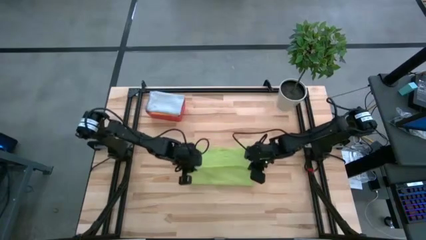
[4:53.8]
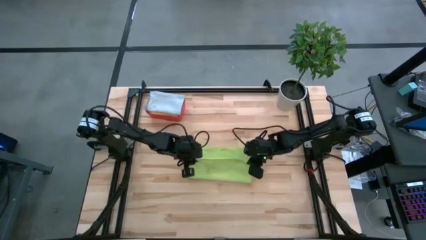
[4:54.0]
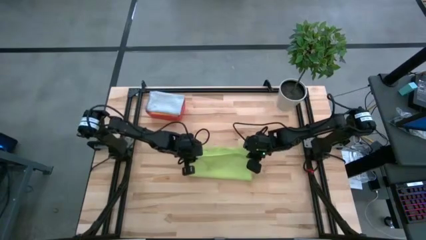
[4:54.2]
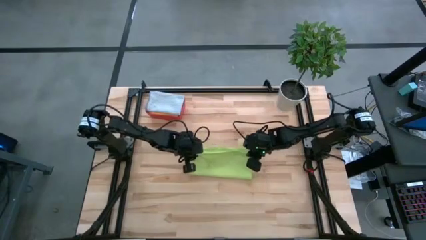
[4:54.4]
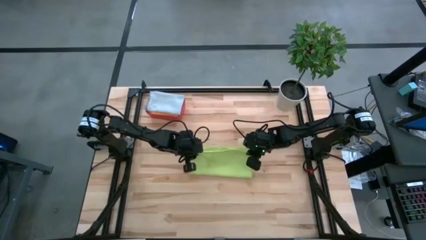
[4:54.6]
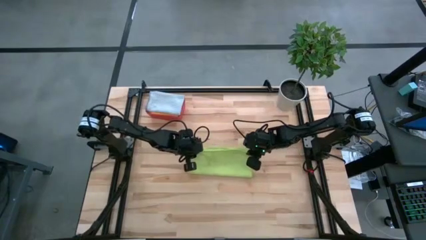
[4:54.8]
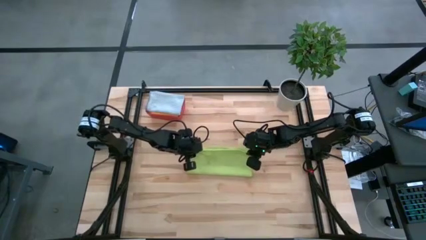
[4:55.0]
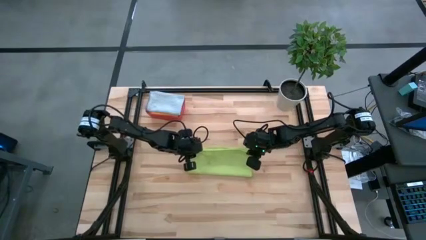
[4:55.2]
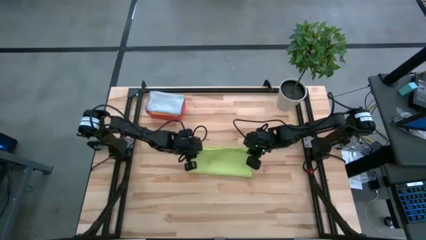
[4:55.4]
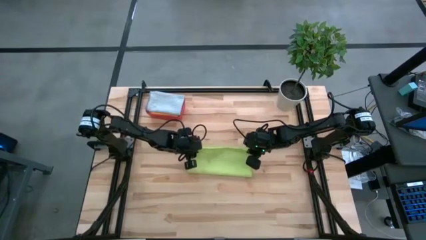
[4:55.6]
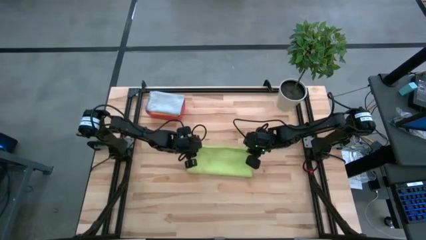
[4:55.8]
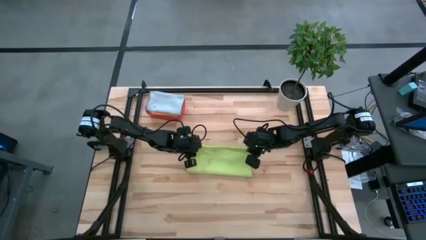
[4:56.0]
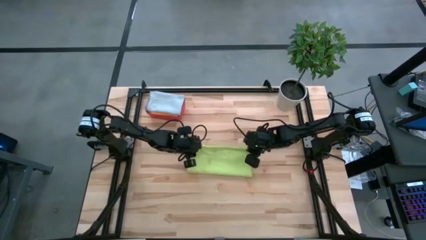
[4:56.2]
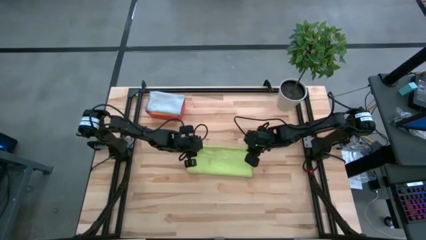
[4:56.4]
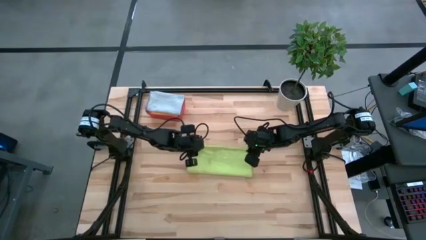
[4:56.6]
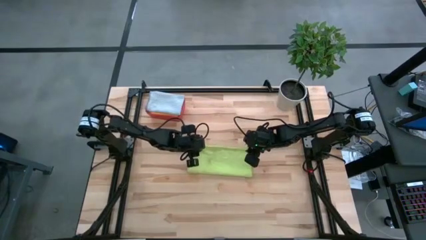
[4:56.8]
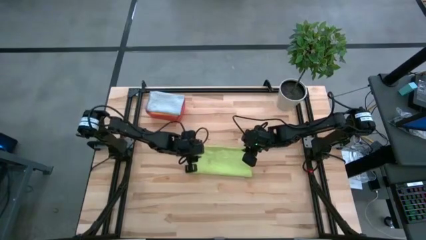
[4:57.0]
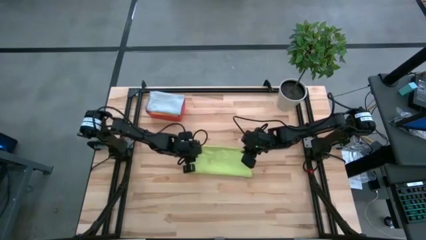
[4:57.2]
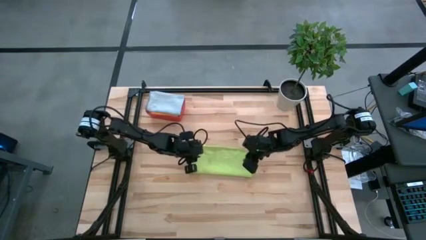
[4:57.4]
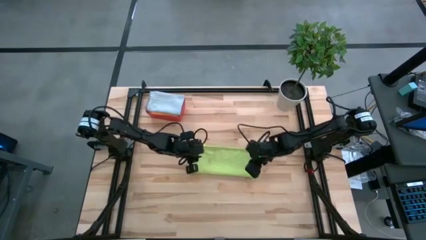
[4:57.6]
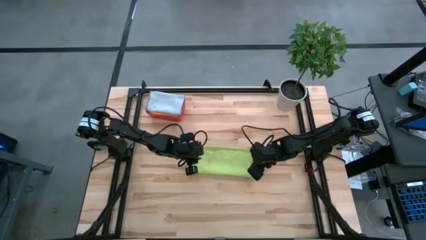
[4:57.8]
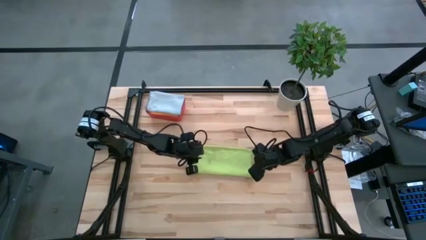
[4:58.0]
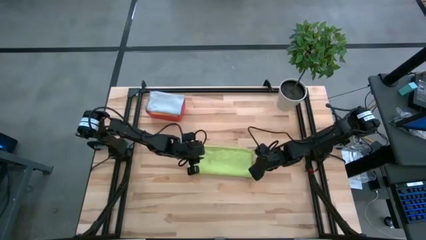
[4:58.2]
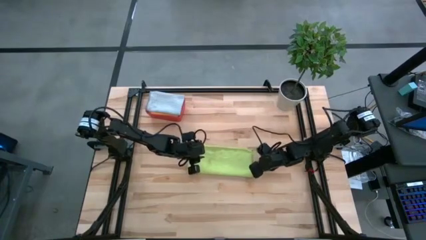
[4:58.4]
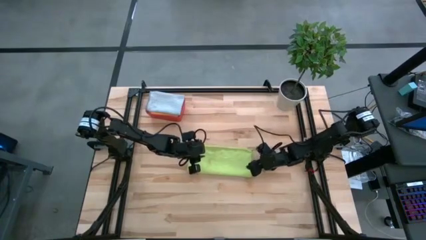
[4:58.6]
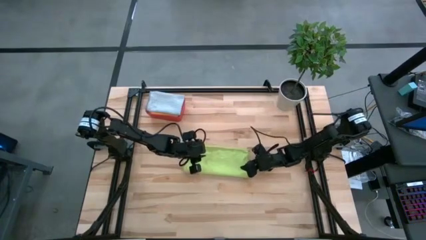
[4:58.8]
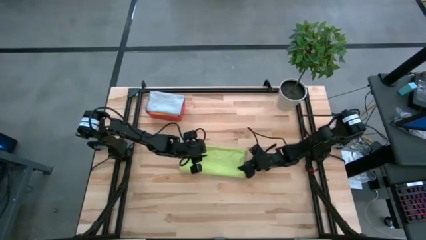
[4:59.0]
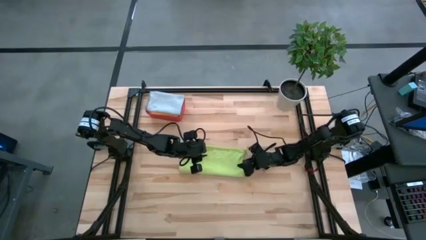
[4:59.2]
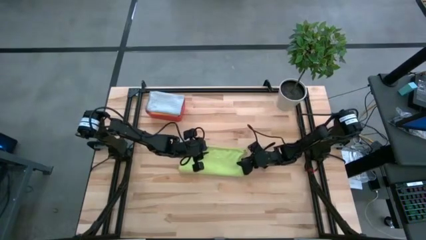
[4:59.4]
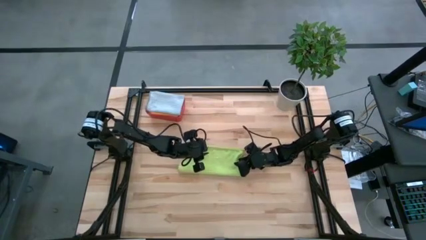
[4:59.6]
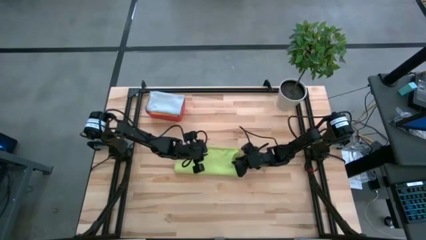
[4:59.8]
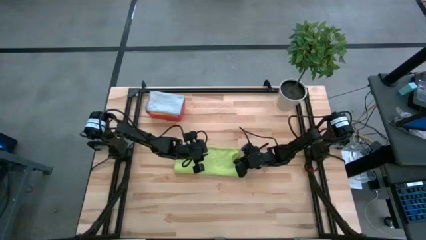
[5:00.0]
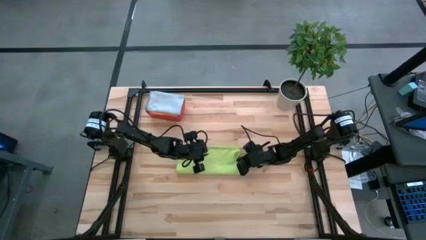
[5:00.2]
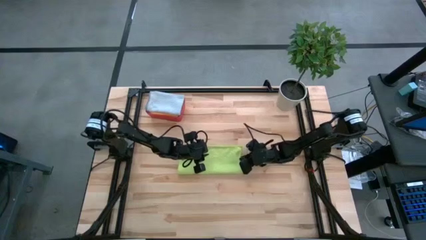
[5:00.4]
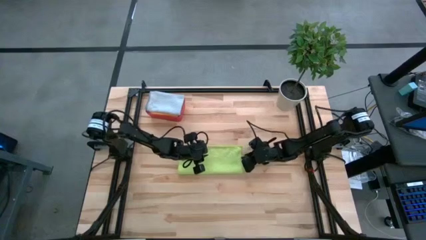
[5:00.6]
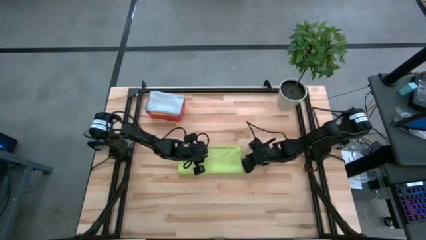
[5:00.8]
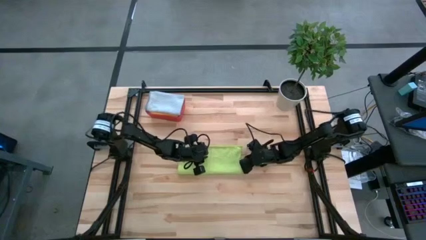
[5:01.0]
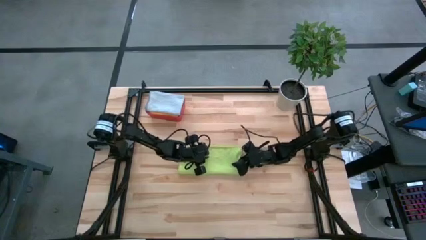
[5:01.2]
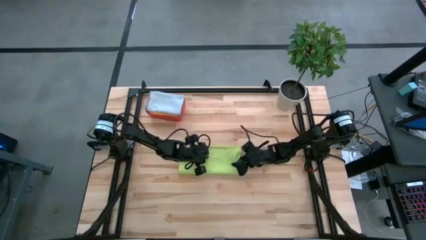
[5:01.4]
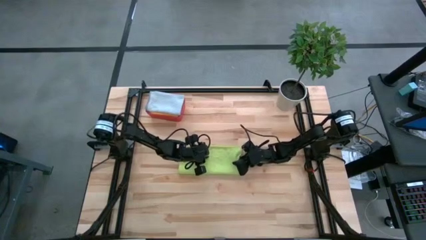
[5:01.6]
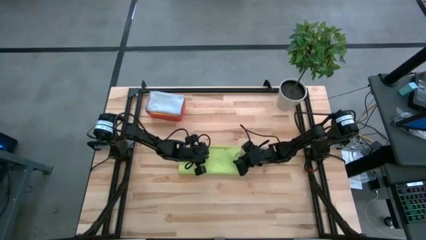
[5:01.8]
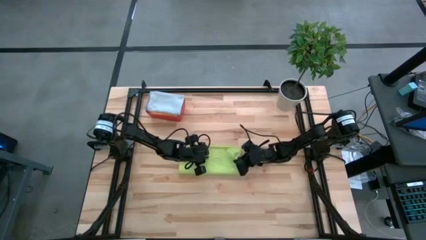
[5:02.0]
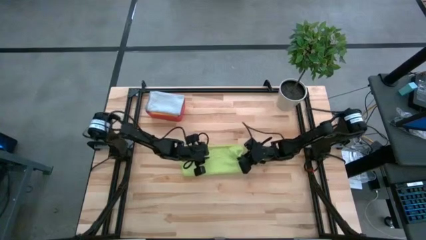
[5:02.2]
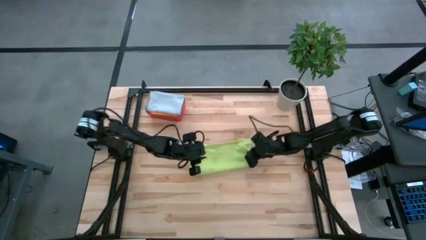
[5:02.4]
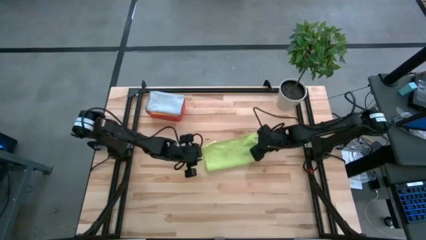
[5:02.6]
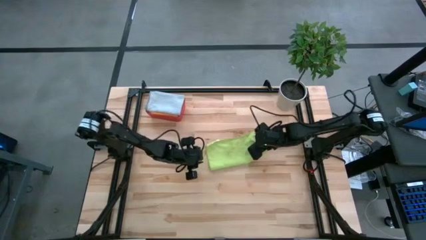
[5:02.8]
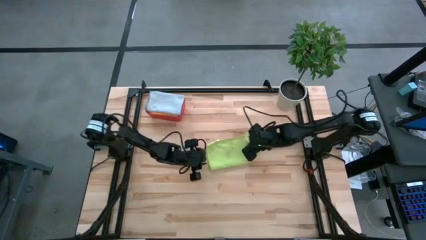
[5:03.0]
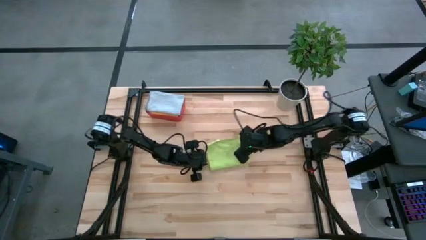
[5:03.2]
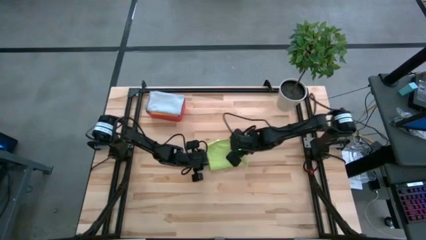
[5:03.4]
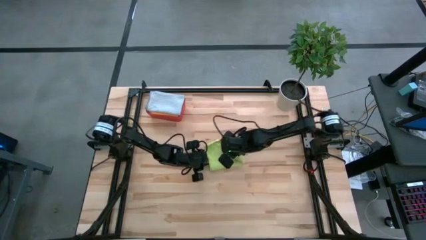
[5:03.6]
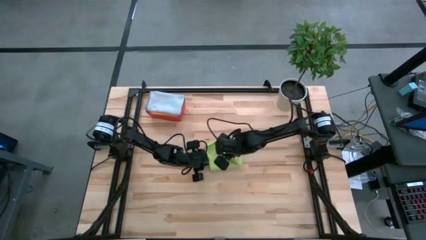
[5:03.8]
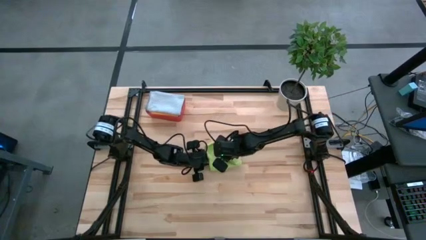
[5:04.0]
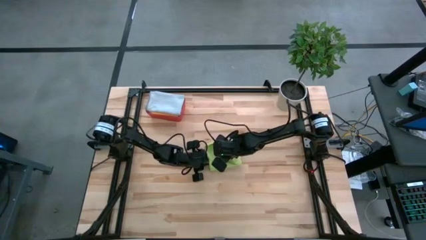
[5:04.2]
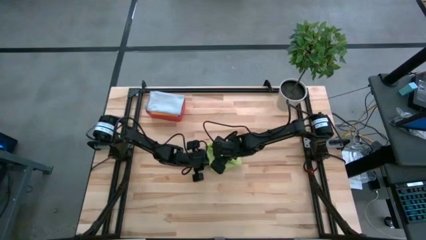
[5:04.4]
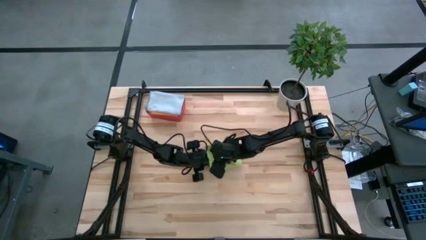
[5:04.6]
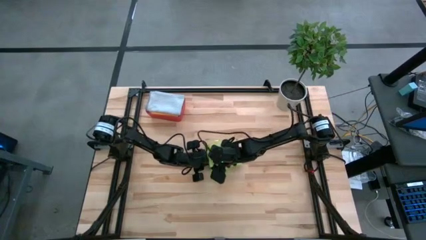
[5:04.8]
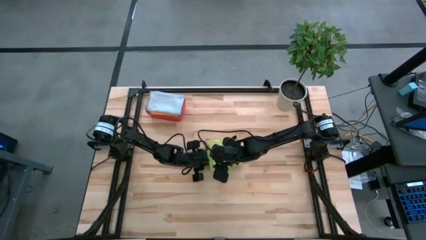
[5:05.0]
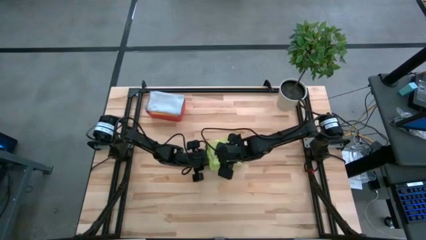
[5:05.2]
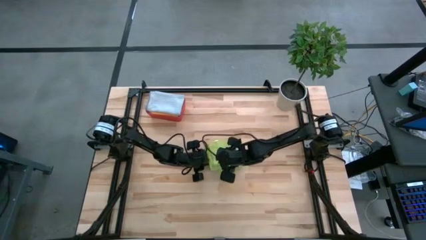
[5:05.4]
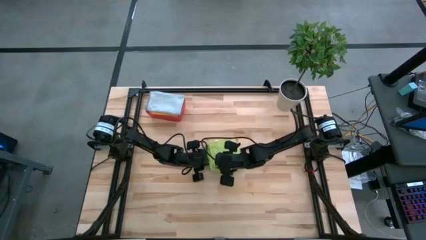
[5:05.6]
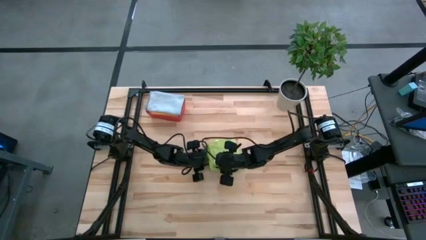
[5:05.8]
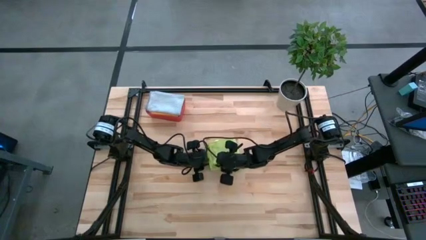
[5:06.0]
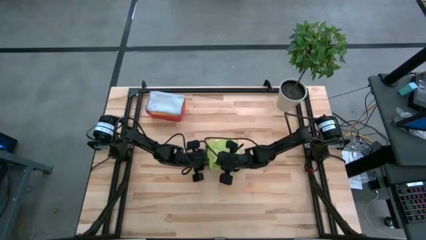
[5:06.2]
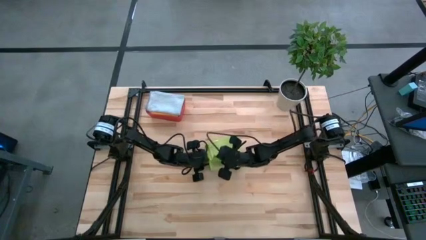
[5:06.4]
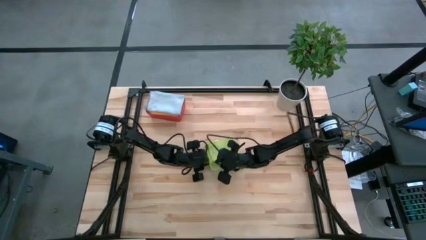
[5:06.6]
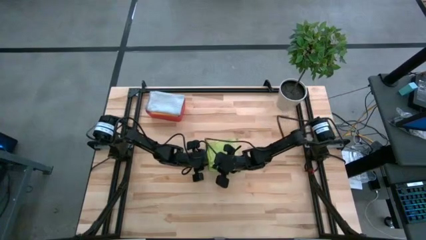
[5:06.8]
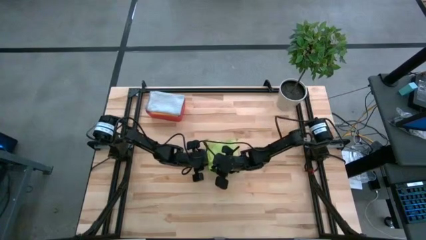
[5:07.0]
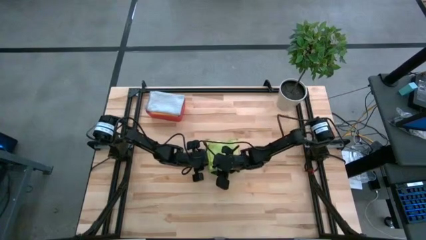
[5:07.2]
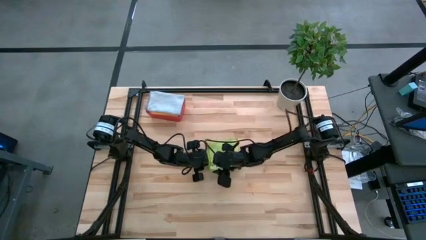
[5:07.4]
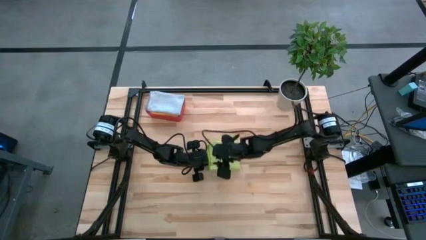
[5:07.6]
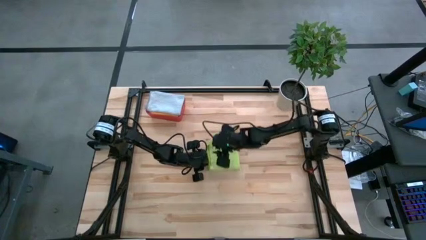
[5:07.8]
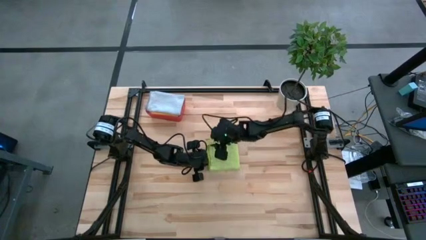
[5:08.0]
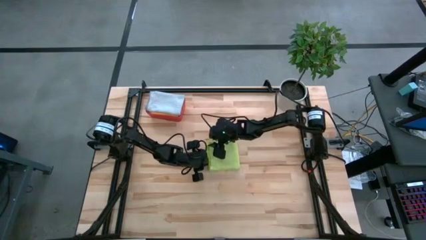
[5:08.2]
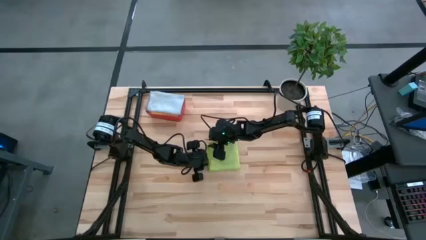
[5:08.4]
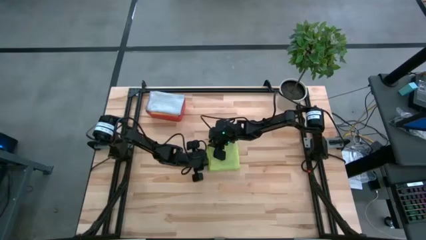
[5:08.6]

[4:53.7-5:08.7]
Task: Fold microfiber towels
Fold the light green microfiber cloth
